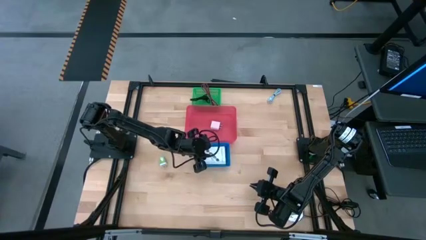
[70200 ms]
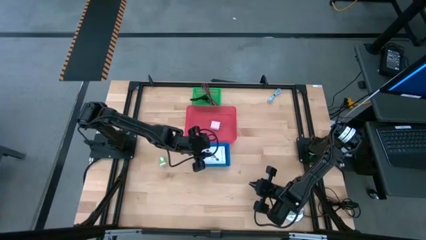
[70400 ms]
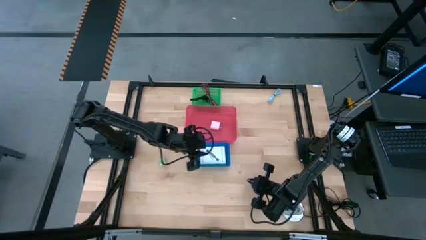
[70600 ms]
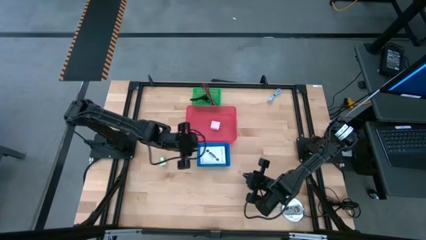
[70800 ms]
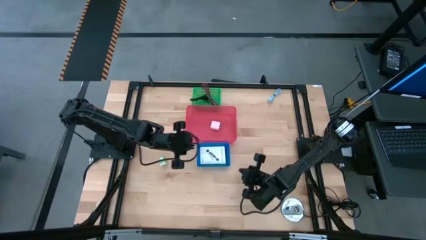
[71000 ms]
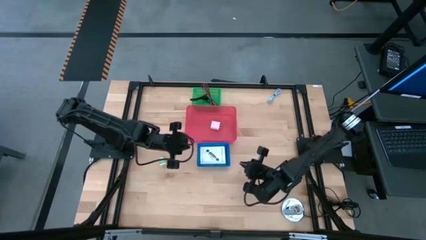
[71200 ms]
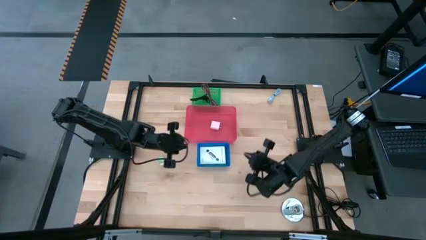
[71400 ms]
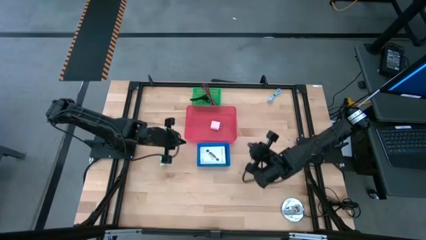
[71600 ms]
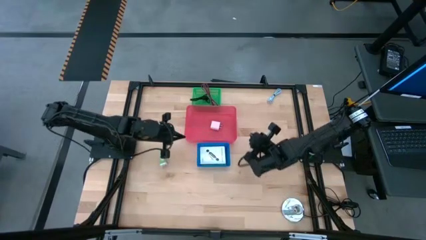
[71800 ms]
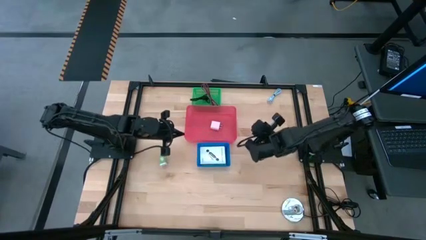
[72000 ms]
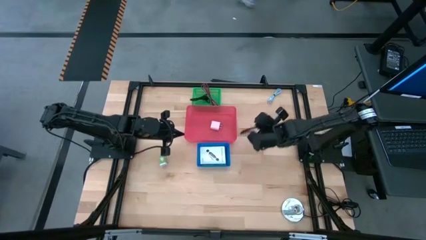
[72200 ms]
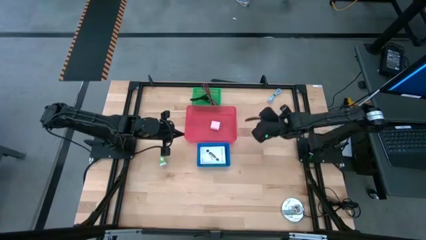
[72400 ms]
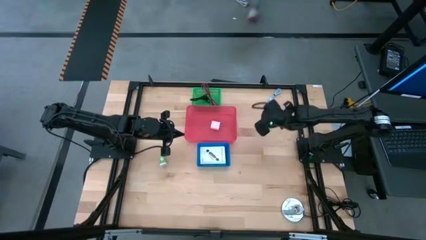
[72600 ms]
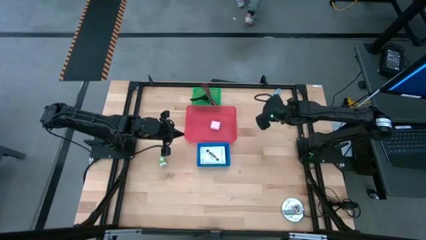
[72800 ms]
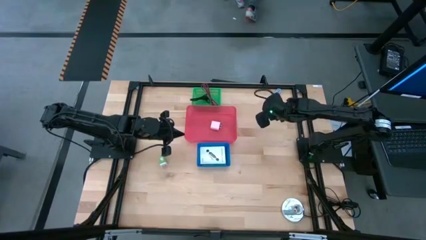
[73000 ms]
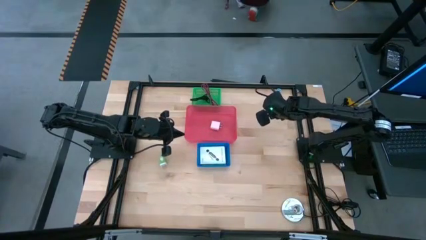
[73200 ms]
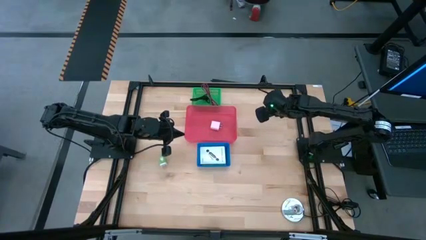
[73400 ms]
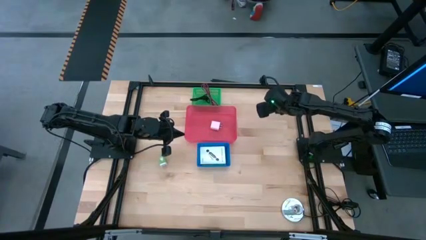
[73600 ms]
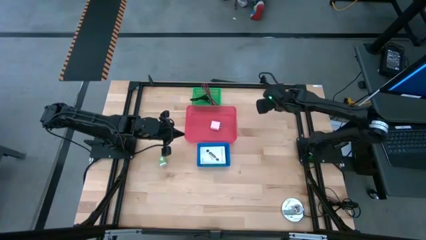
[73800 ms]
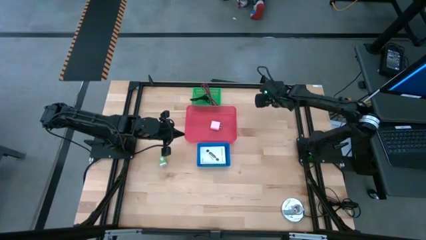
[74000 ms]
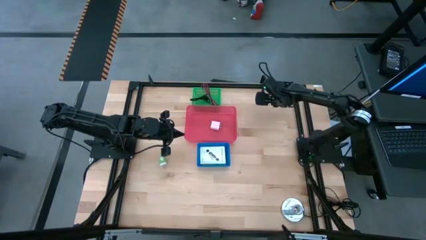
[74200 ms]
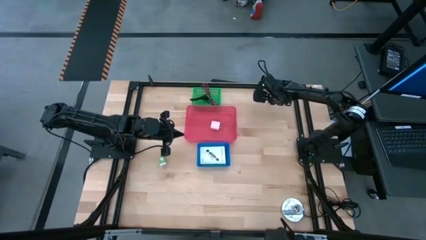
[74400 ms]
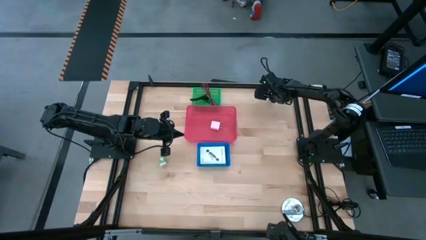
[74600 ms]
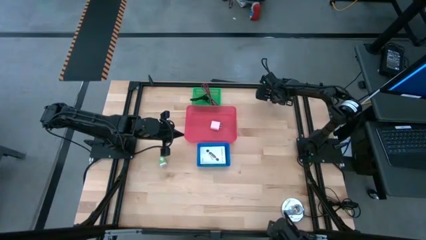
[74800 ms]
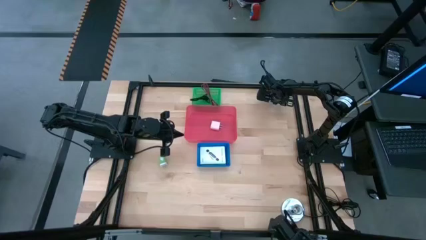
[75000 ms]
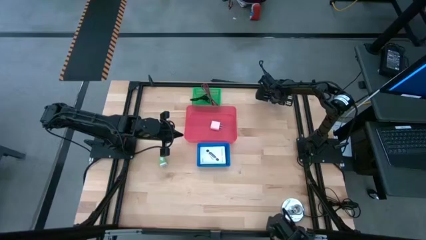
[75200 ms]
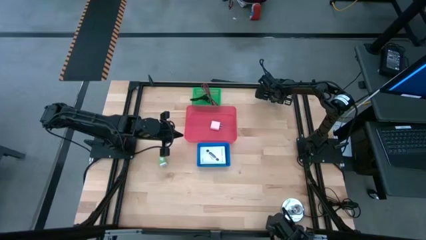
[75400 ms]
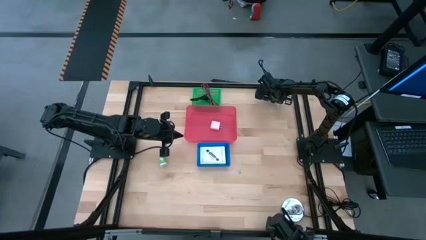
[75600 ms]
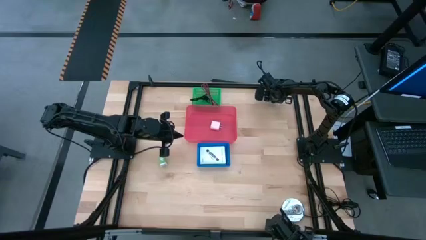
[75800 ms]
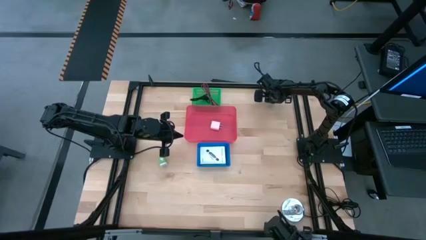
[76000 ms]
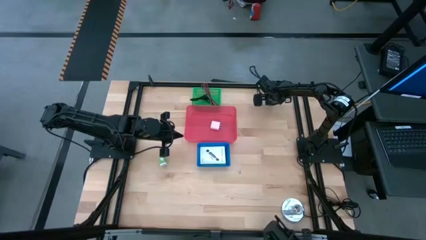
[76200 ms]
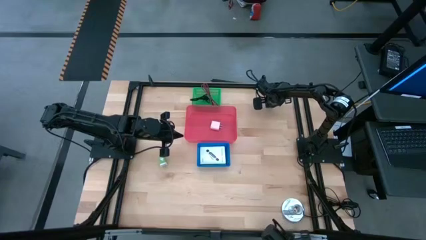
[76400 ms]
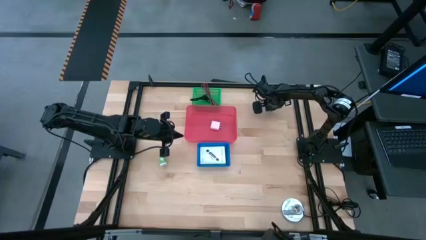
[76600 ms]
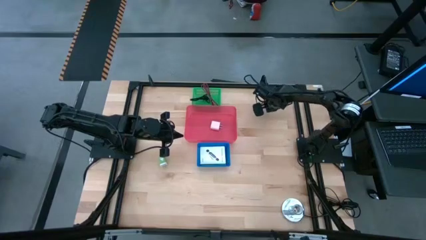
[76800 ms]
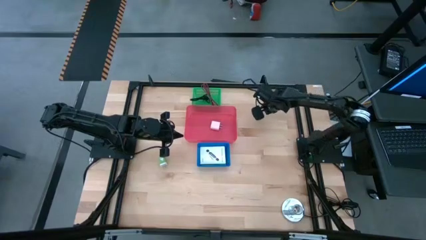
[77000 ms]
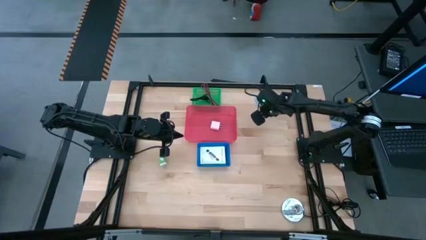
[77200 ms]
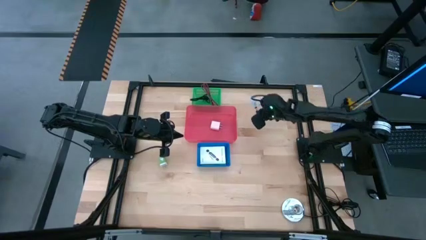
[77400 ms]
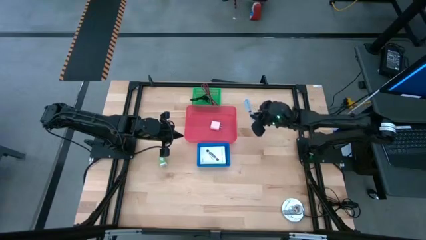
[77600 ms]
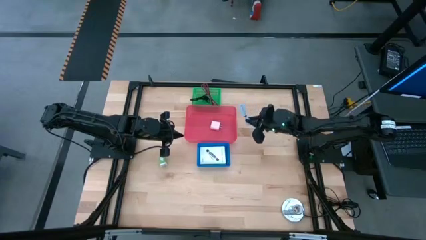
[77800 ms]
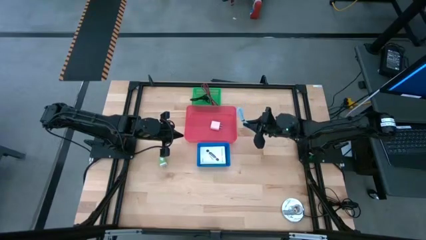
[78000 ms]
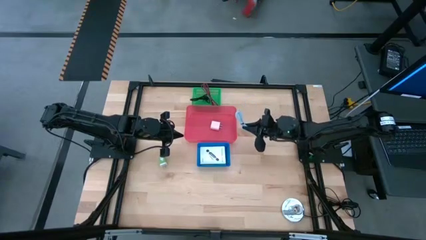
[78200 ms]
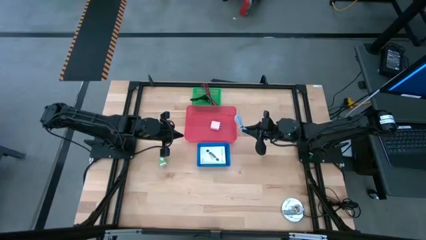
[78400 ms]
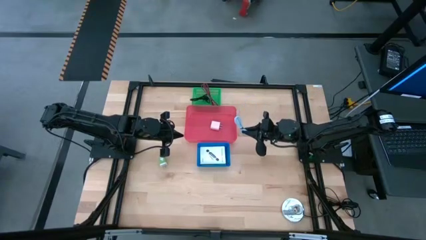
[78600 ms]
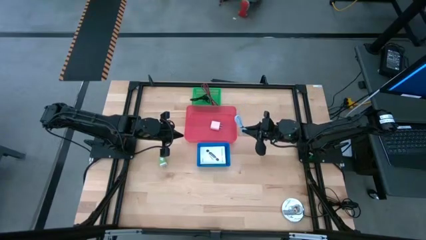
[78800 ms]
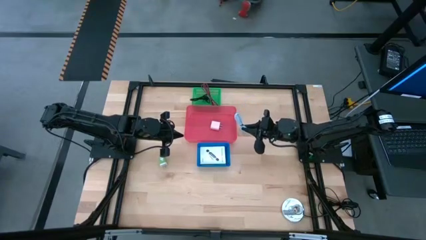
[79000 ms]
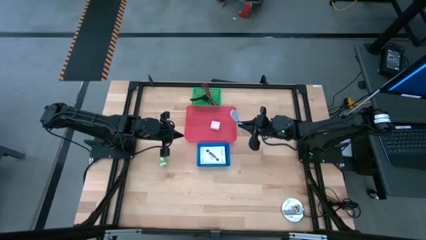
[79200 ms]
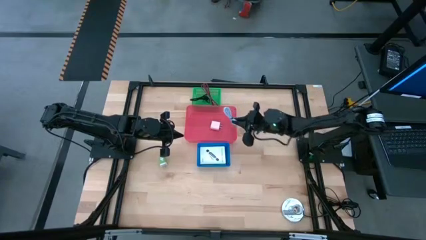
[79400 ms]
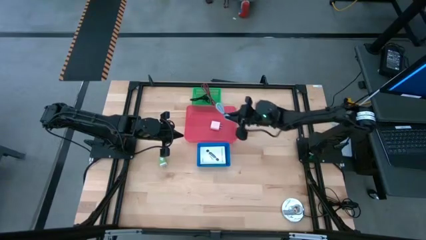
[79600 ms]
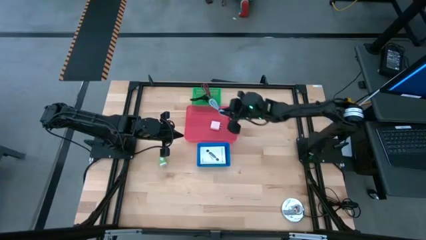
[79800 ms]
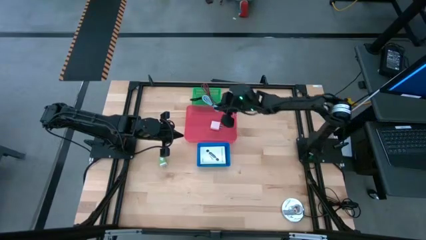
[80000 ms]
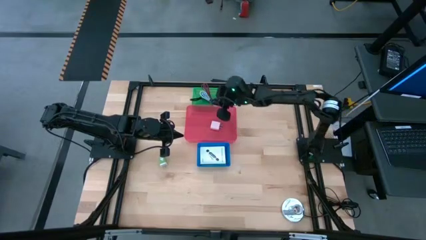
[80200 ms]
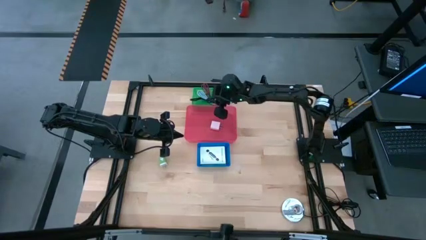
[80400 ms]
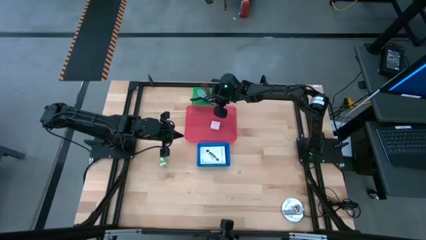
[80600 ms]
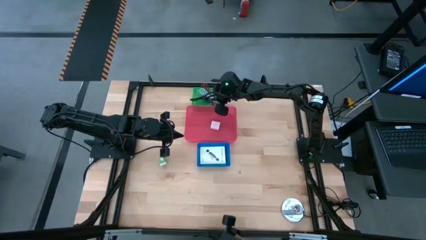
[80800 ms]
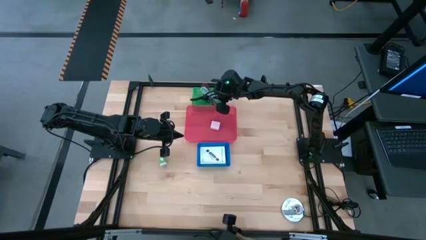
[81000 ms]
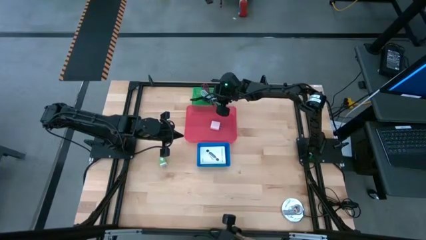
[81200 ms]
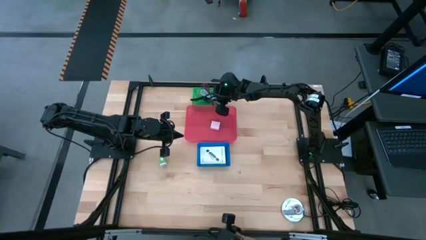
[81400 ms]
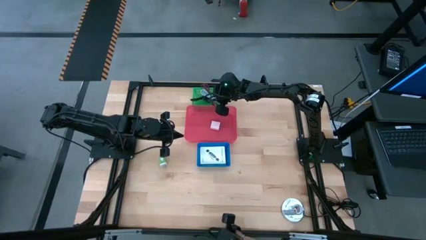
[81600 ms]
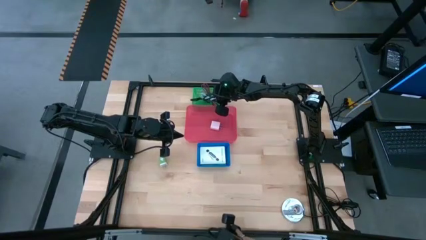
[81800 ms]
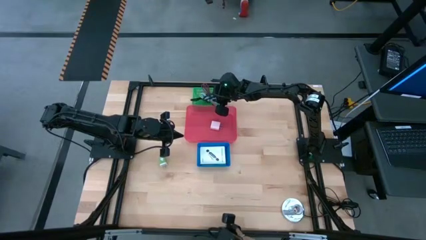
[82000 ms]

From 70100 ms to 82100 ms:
Task: Pick and place items into bin
Put the white charger cable into the green bin
